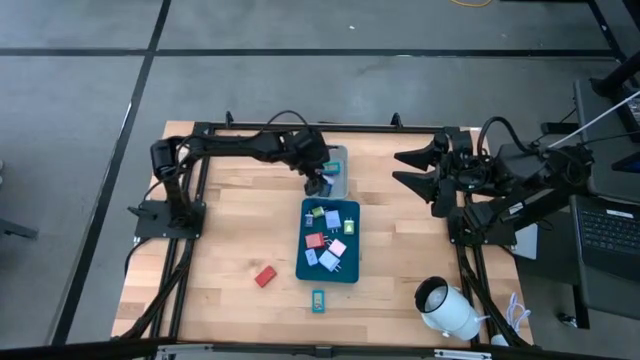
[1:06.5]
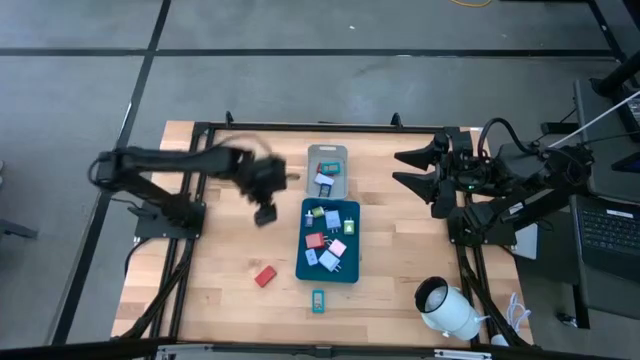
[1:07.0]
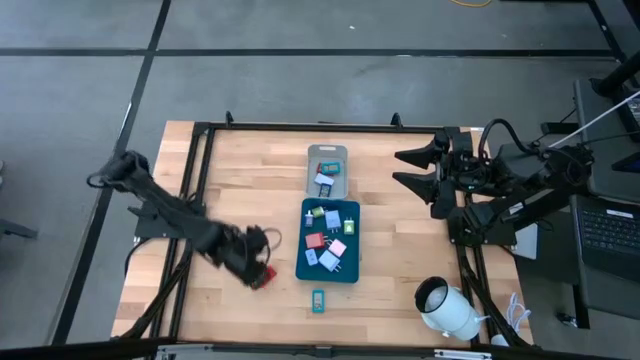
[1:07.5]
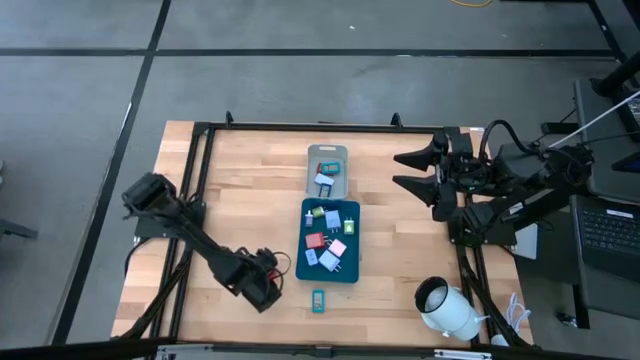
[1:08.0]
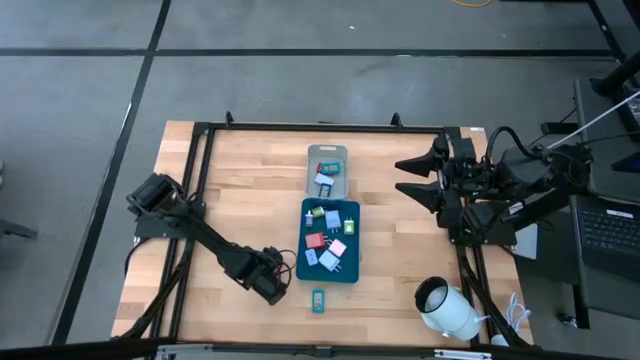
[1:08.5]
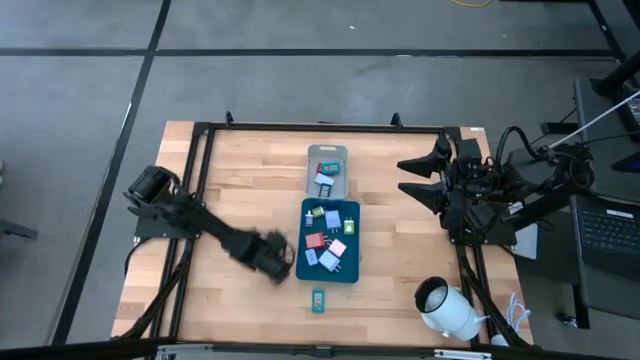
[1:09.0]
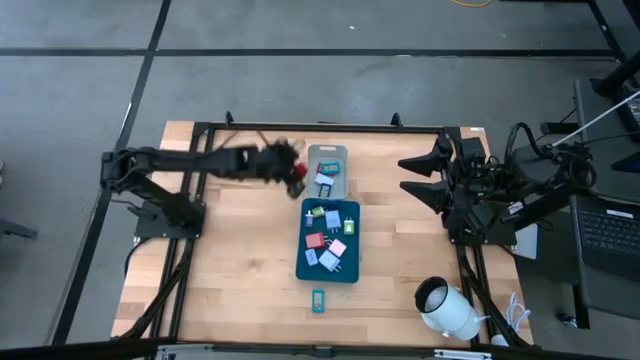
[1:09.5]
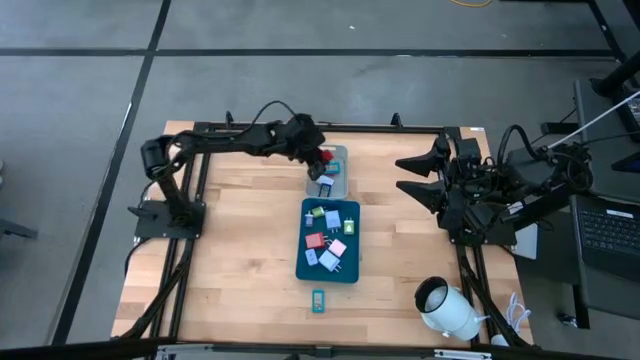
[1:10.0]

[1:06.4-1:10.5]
Task: Pick & Place Office items
Put the orange digital clock into the gray bin

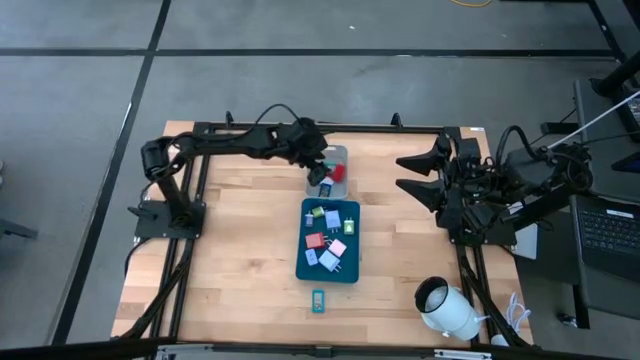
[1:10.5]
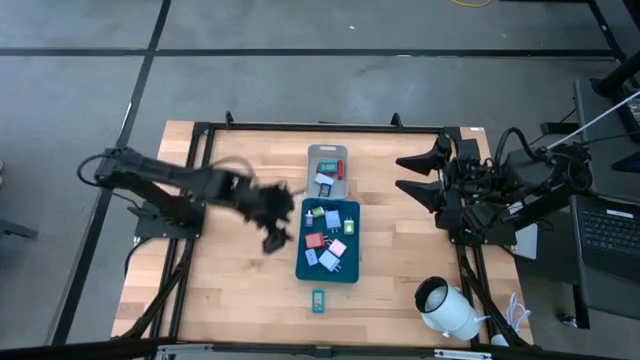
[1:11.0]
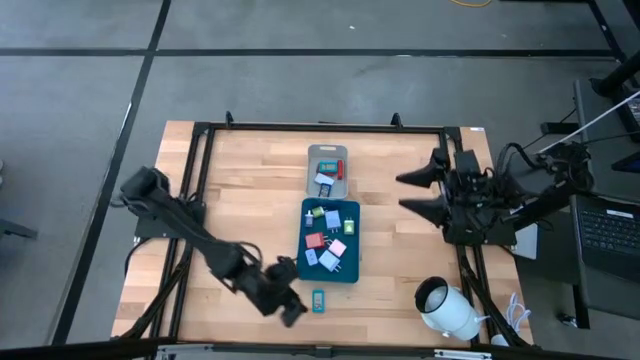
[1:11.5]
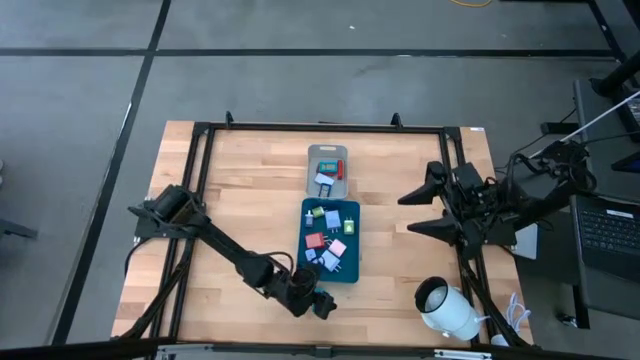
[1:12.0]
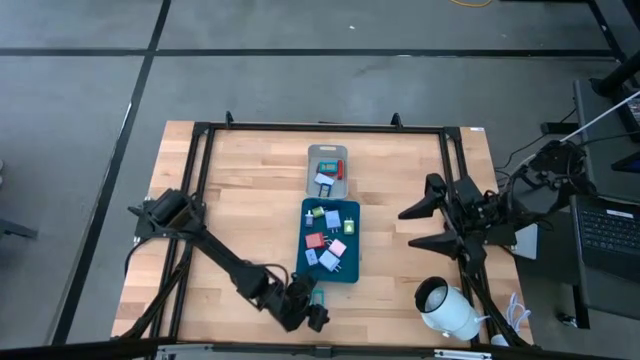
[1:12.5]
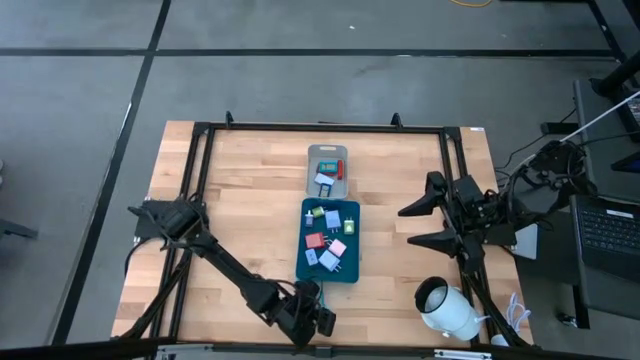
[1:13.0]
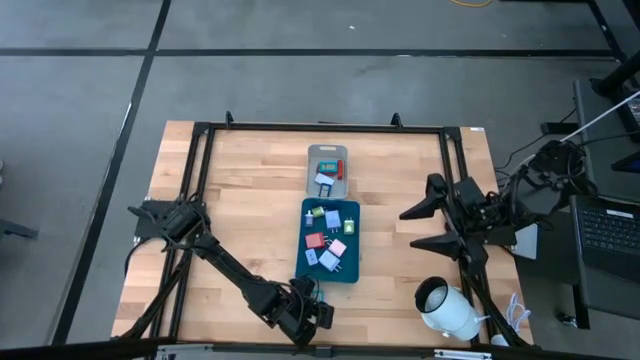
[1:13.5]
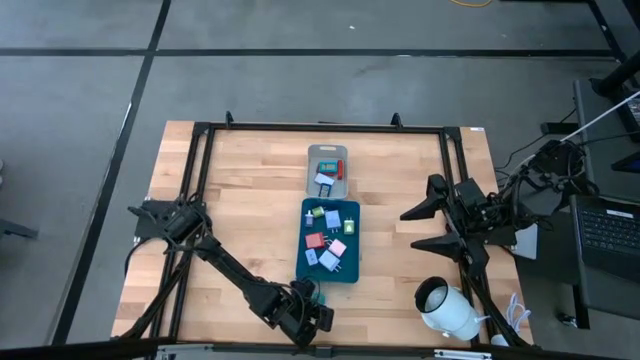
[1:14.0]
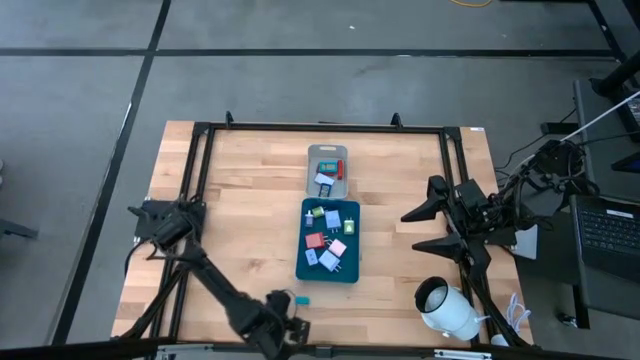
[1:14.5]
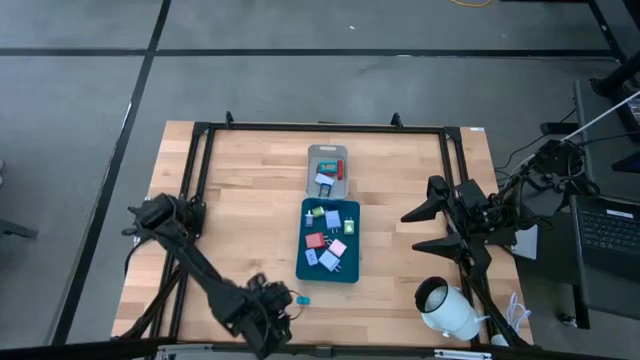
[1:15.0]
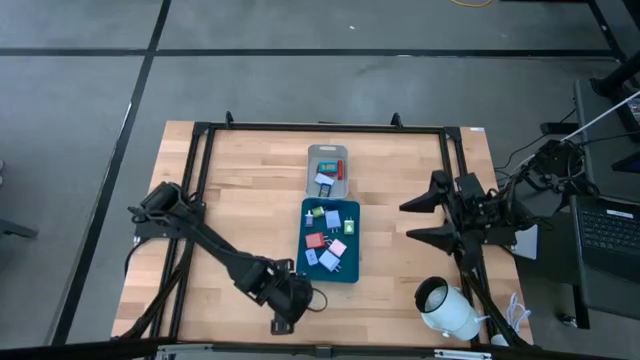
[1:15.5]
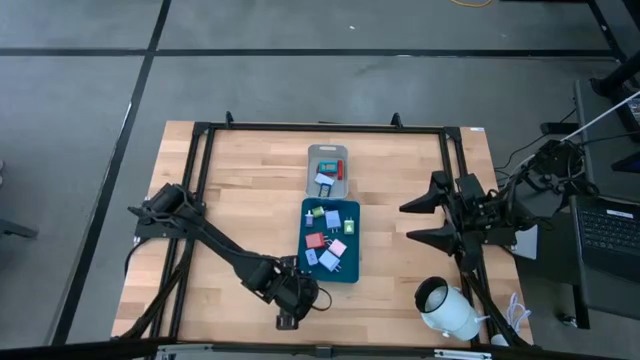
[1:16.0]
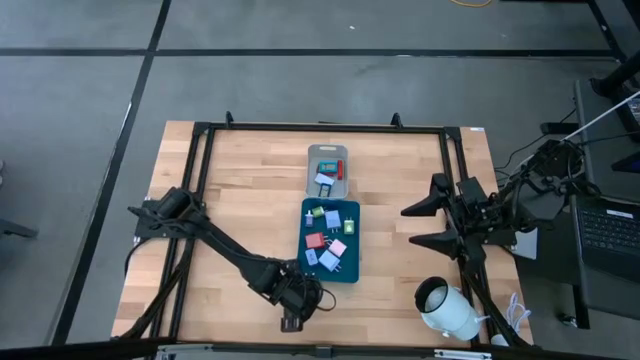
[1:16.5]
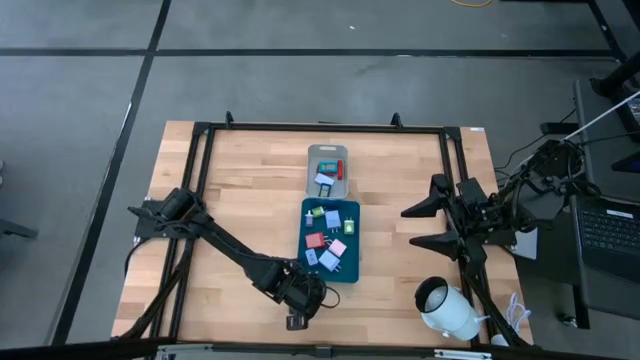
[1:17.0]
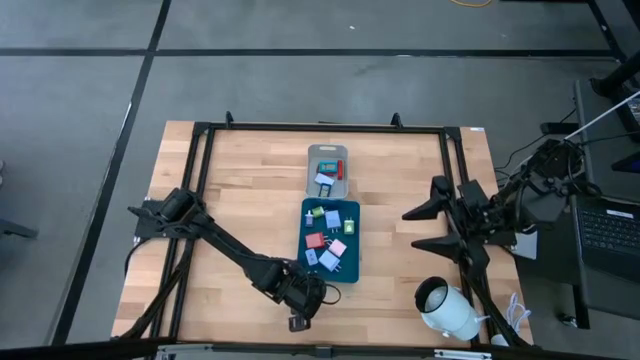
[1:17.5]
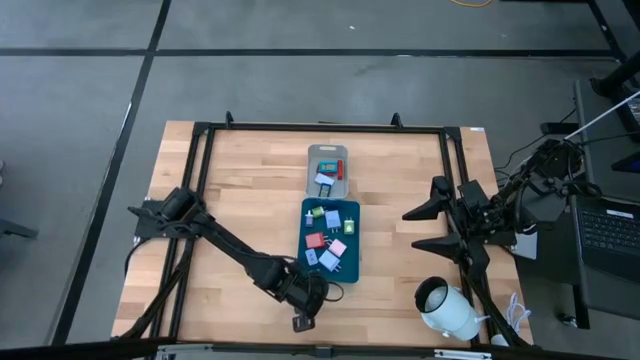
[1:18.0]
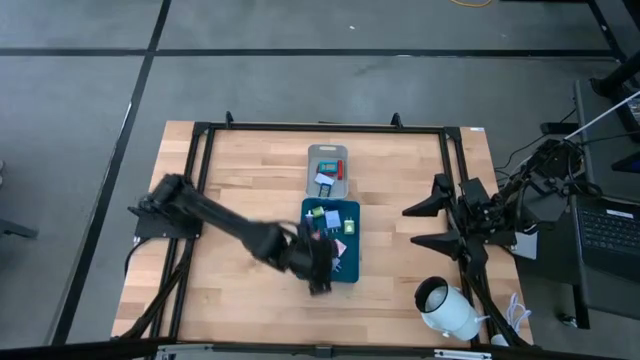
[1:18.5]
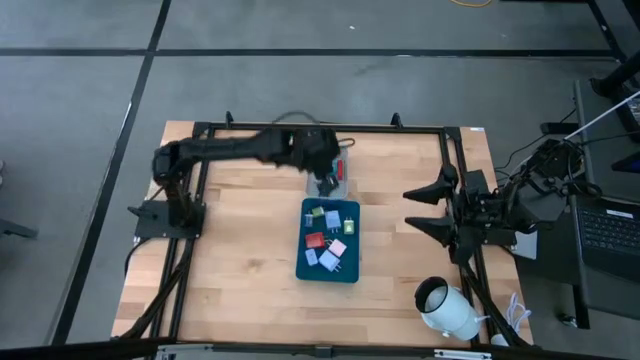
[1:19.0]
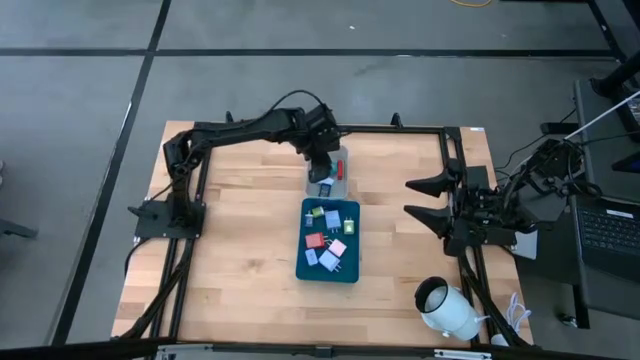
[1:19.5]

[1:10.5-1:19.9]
Put the light blue digital clock into the gray bin

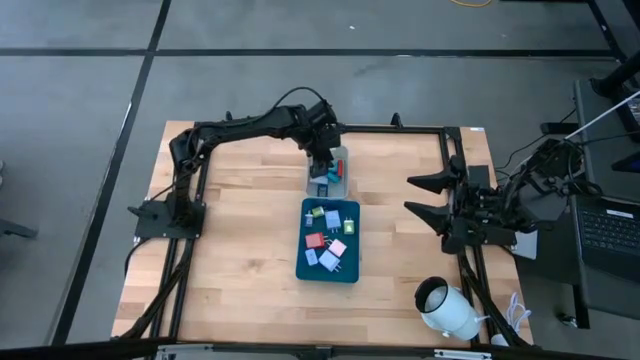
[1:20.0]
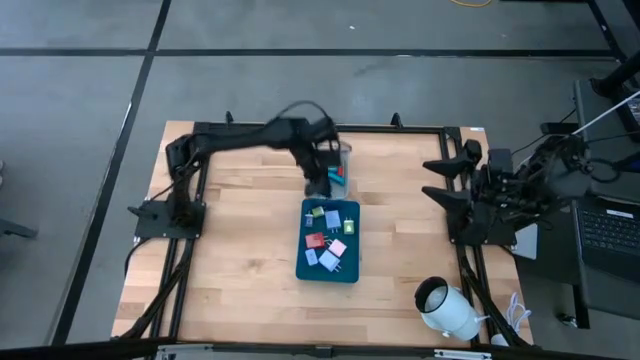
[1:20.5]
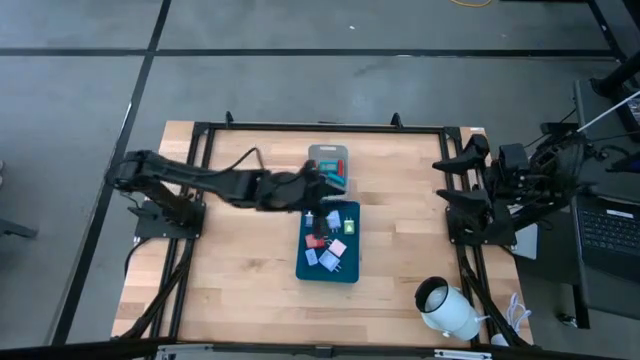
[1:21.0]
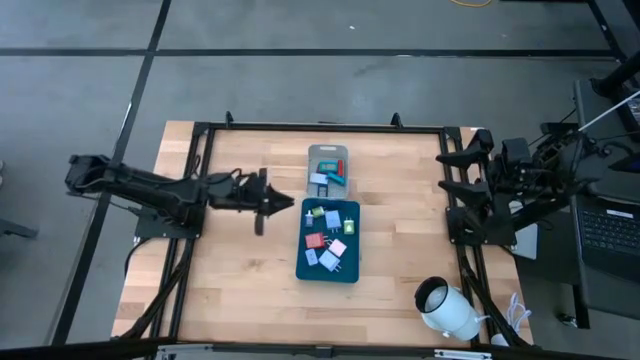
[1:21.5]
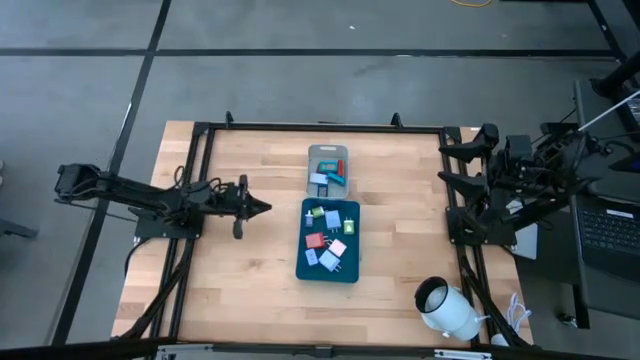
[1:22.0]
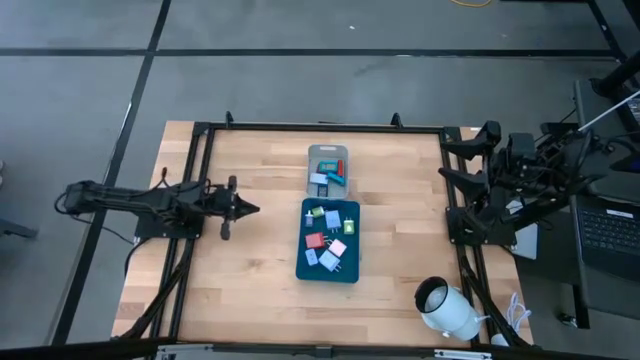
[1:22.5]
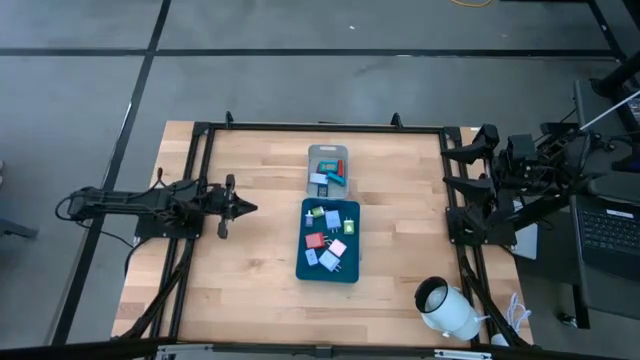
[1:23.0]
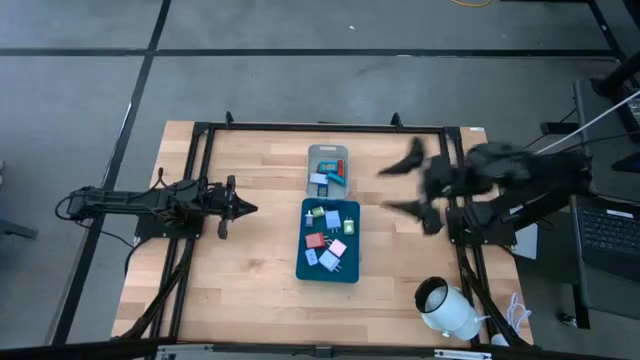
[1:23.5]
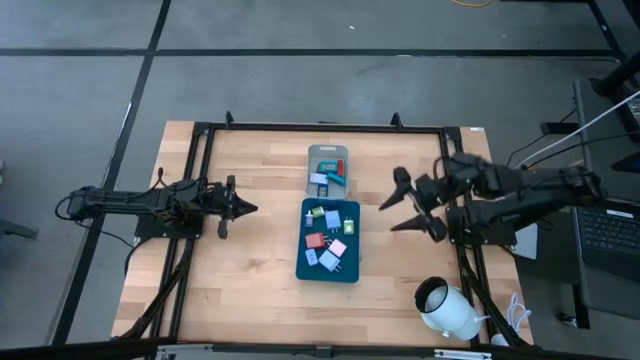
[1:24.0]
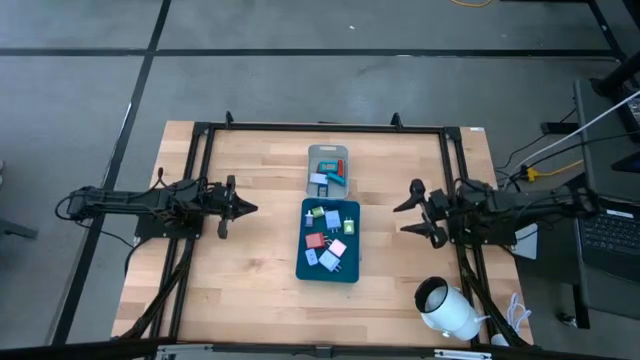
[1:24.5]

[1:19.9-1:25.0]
Return to Home Position

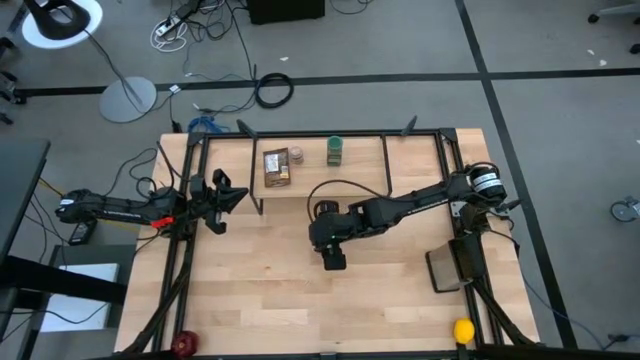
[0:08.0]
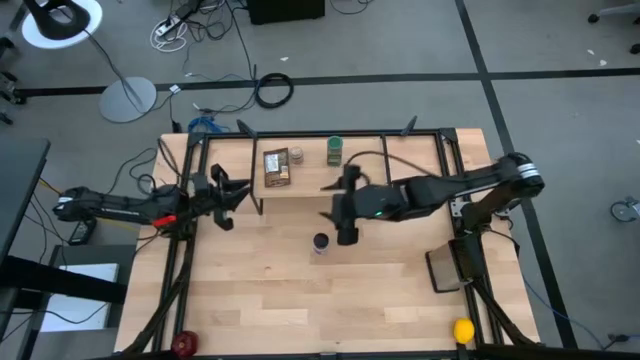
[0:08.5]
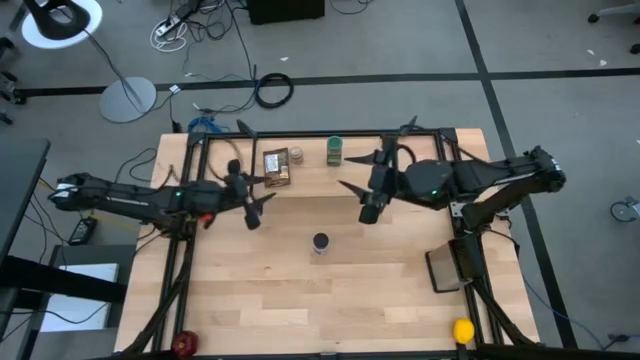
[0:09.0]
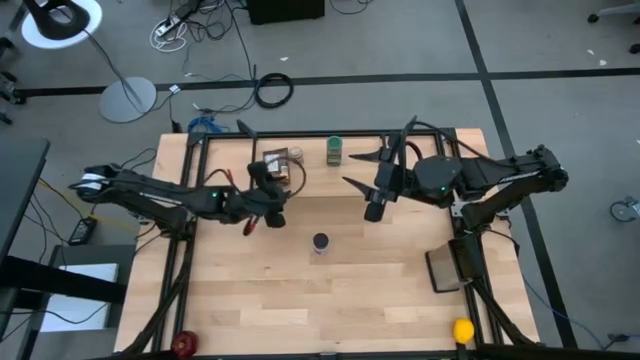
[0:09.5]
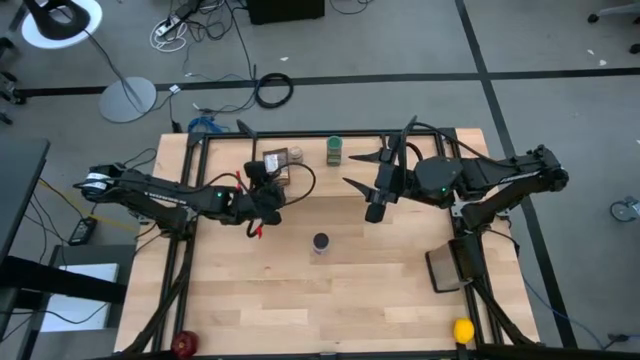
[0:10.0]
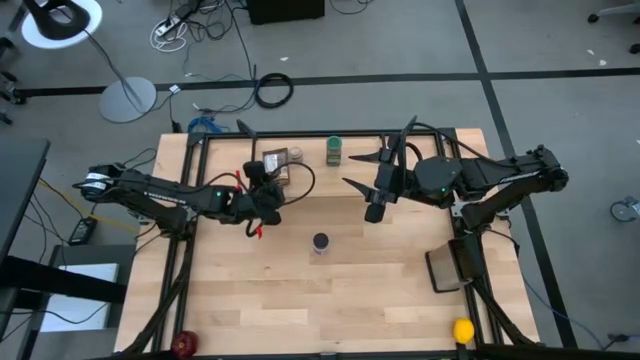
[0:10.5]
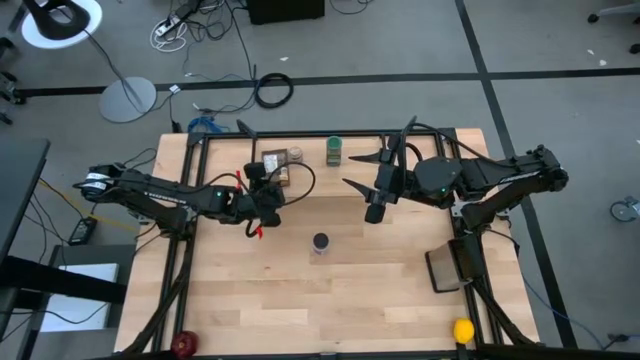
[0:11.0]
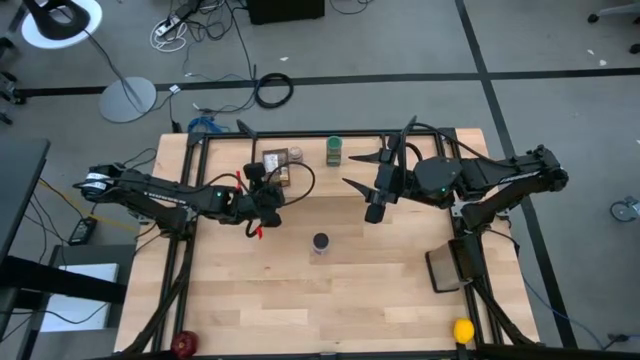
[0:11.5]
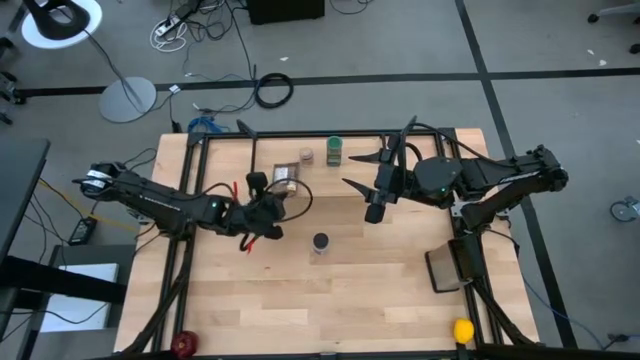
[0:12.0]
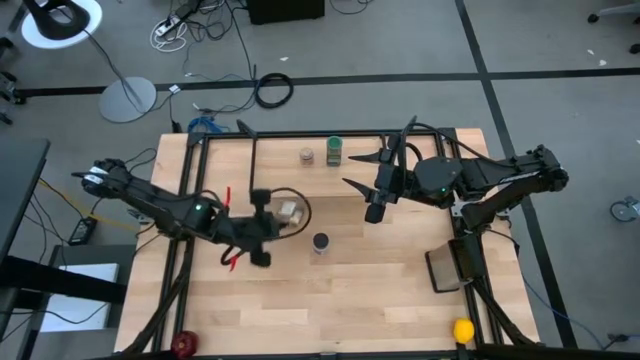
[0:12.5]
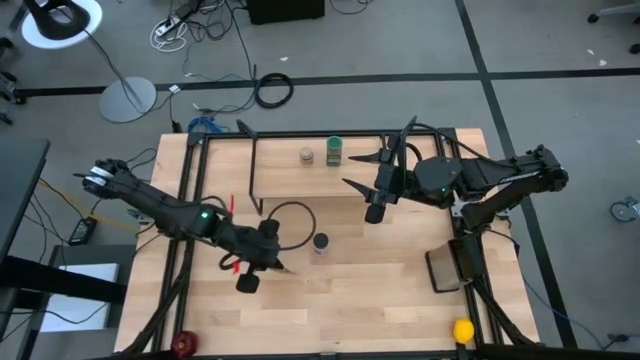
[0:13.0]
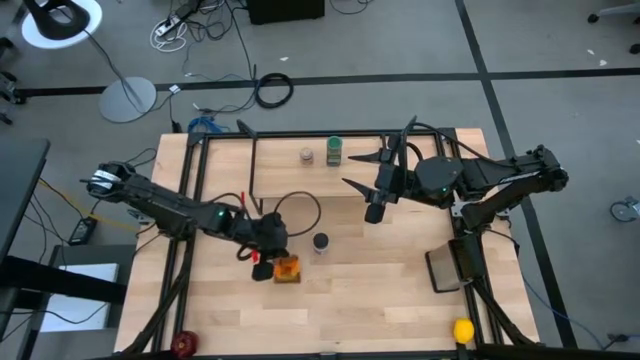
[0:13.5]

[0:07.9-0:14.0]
Task: Shelf spices
Remove the brown seasoning pack from the shelf
